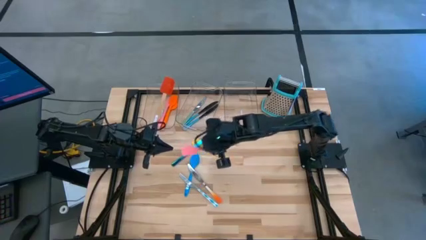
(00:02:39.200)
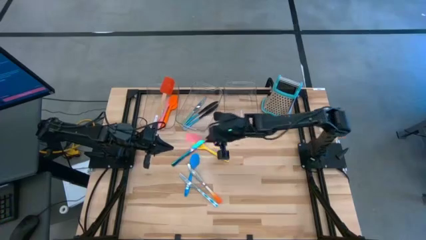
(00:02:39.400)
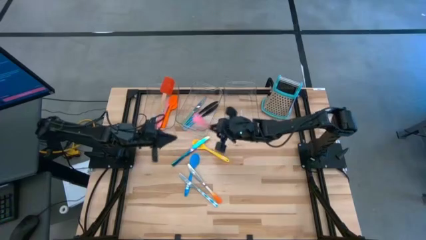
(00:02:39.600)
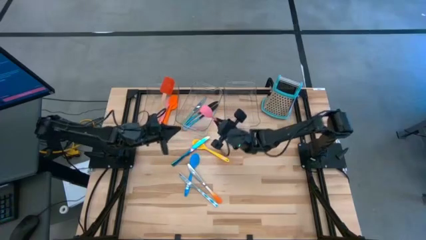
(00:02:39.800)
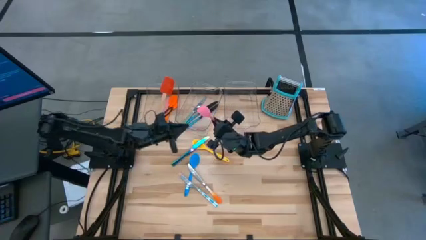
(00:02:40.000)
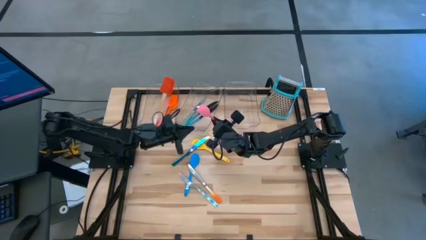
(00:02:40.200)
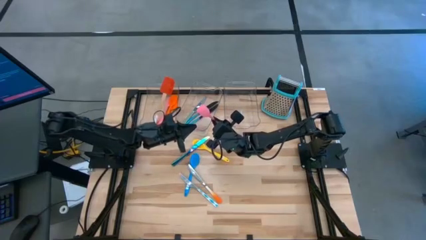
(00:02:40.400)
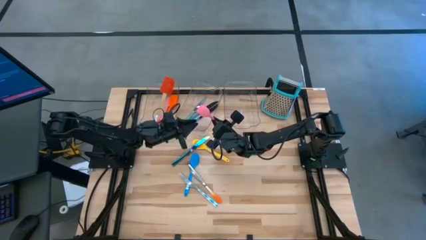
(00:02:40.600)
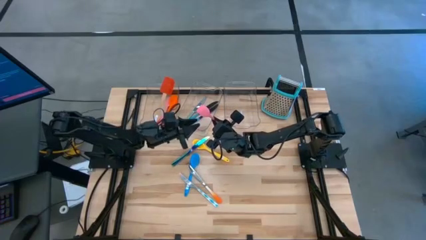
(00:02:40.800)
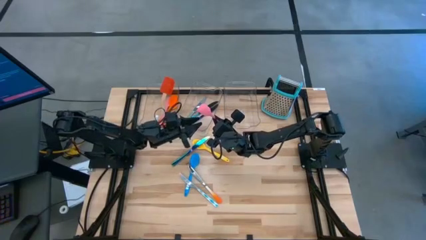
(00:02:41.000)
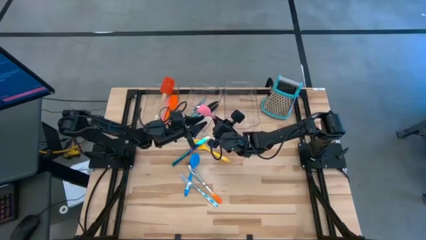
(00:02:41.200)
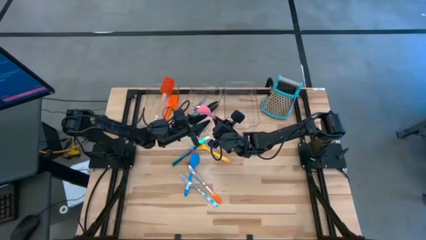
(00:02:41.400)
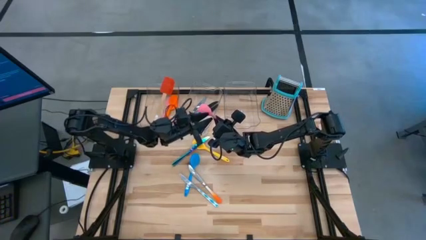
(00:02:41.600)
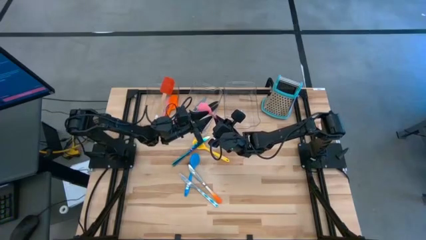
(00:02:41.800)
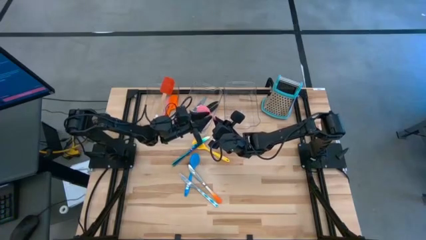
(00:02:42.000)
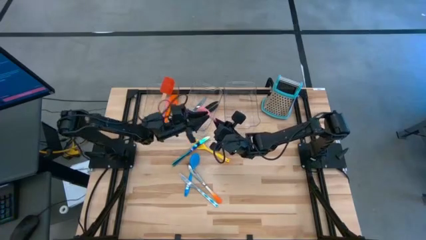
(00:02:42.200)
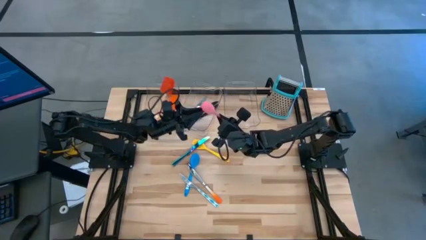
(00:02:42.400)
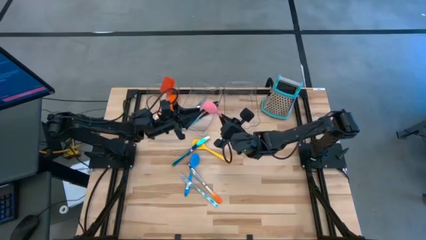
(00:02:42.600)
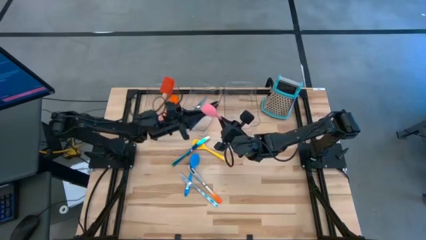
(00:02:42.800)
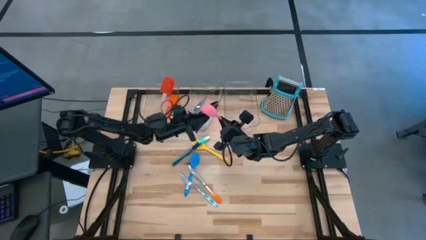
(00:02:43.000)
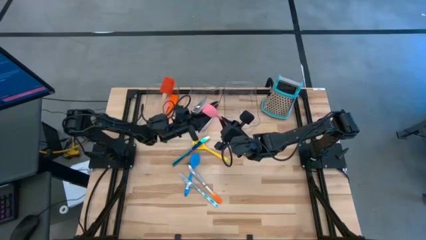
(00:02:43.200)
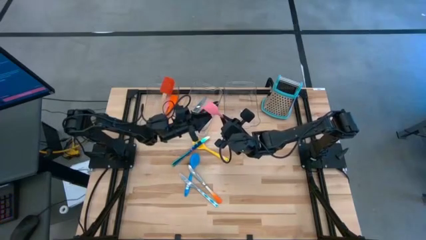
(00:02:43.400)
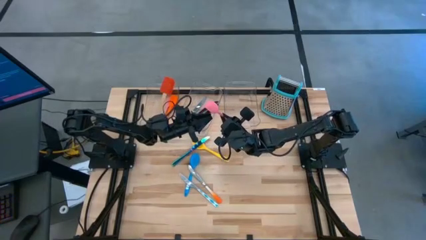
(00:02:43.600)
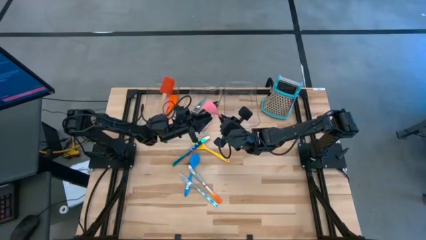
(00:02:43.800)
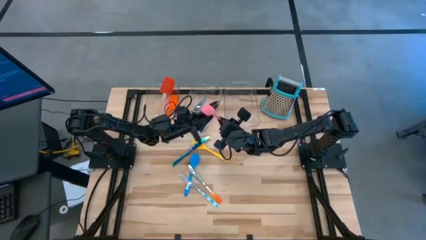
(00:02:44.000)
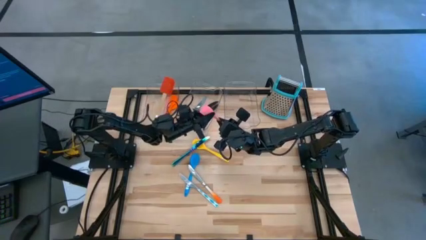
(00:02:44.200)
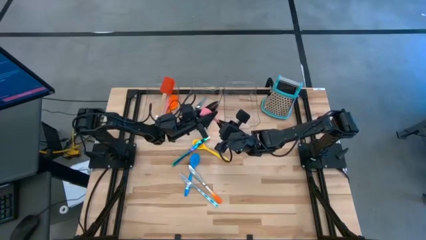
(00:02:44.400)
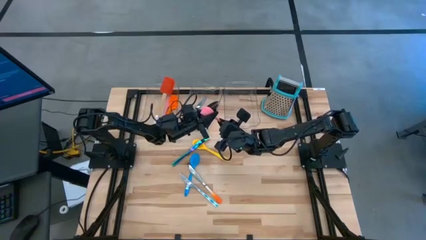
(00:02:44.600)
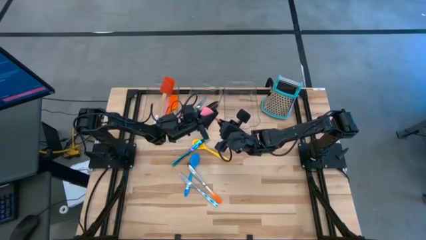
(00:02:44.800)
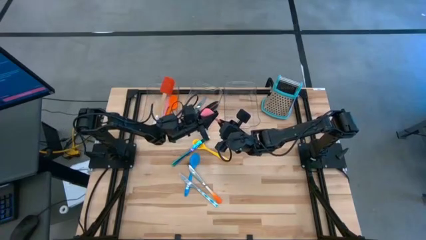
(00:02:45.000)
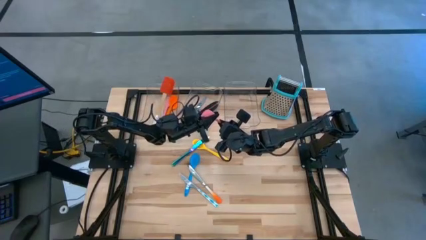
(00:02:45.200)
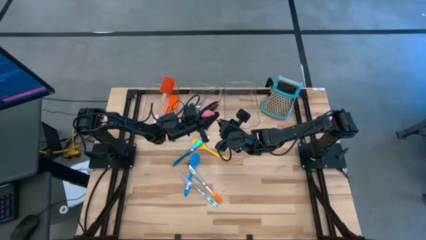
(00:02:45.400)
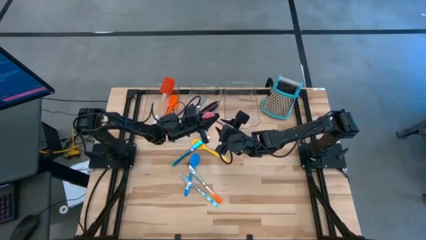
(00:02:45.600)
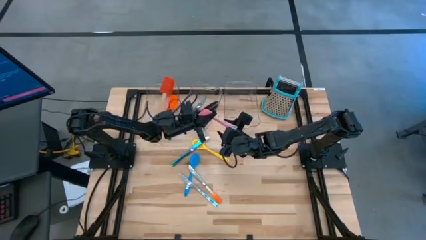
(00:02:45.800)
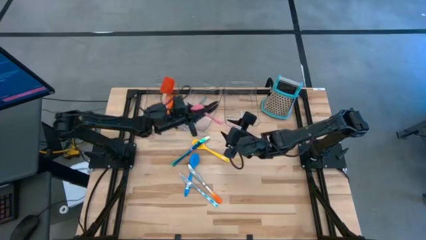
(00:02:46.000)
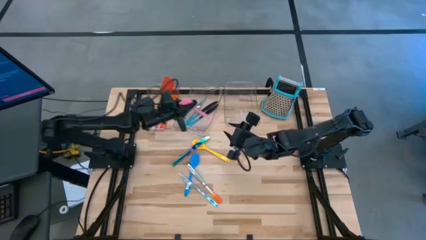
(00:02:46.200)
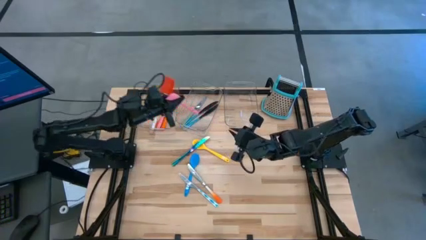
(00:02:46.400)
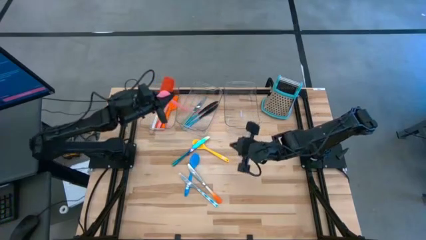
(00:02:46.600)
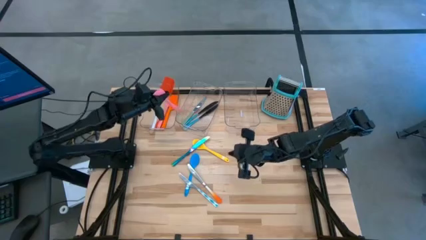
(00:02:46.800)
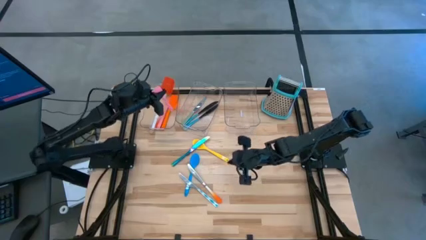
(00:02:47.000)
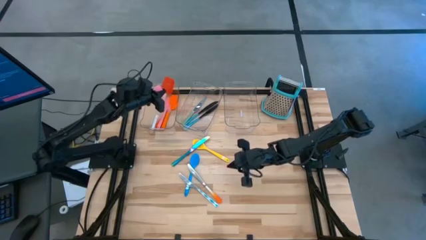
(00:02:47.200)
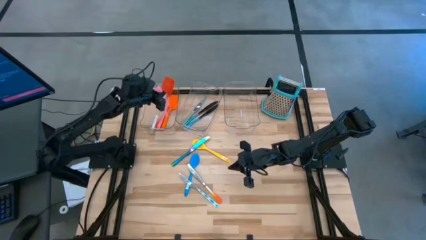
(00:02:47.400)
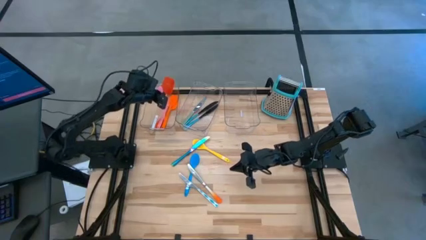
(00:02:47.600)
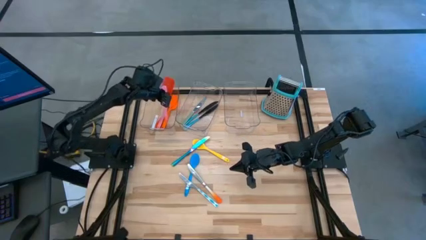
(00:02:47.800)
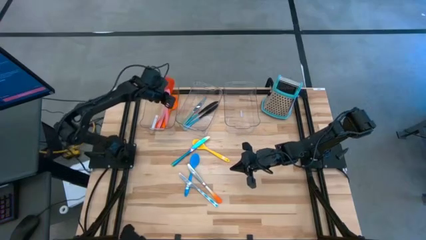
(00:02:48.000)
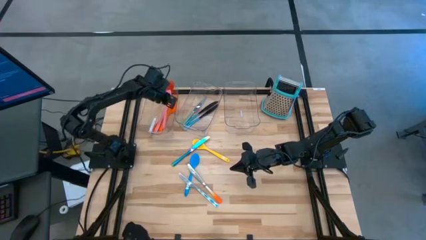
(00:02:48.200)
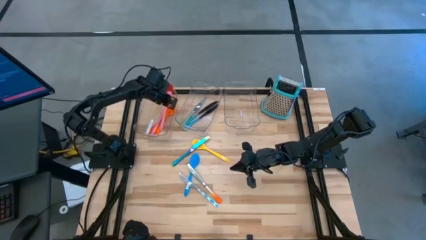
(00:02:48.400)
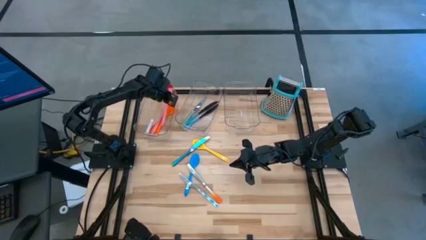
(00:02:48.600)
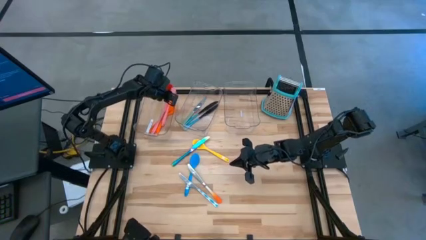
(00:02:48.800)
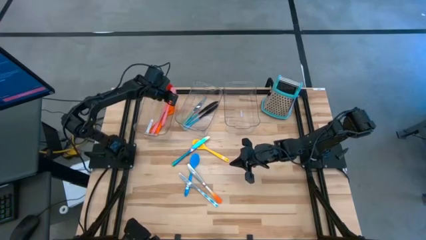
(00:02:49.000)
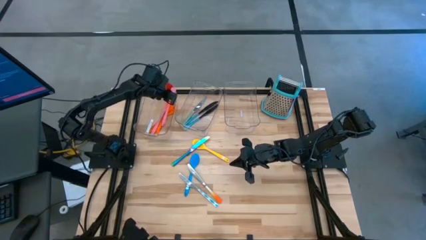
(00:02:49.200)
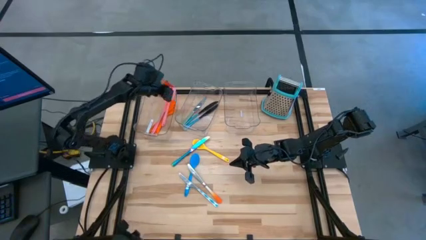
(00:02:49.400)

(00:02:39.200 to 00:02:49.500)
Task: Pick & Place Kitchen Items
Put the pink spatula into the left transparent bin

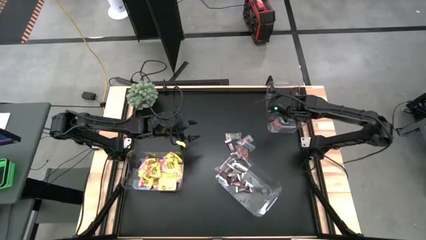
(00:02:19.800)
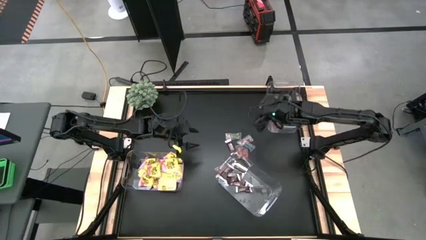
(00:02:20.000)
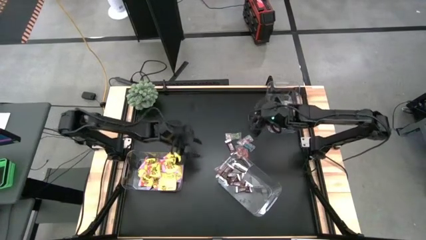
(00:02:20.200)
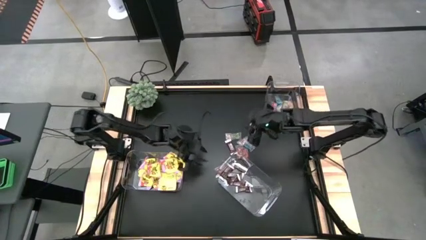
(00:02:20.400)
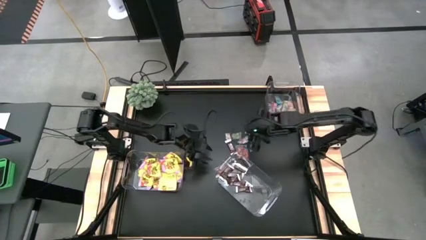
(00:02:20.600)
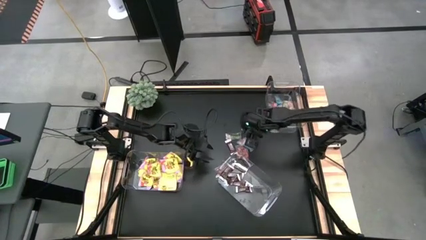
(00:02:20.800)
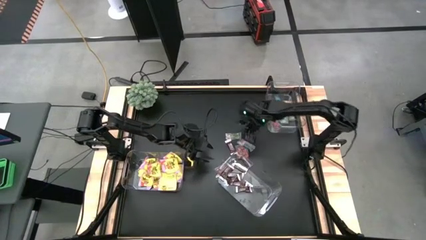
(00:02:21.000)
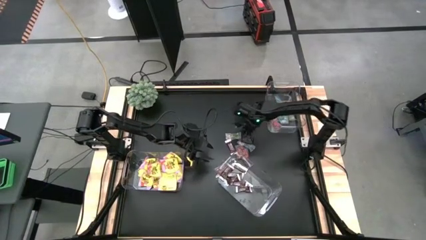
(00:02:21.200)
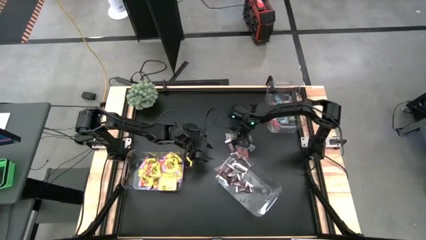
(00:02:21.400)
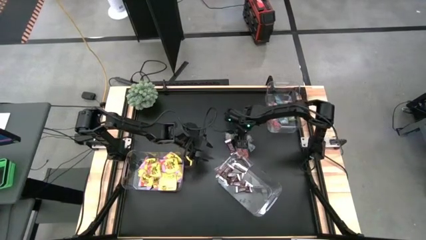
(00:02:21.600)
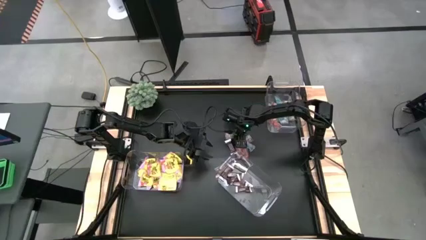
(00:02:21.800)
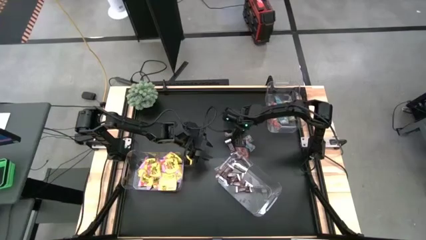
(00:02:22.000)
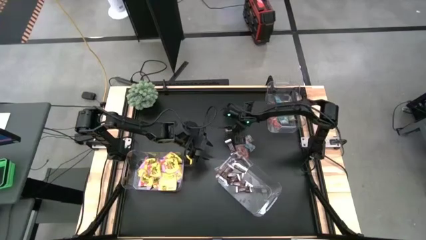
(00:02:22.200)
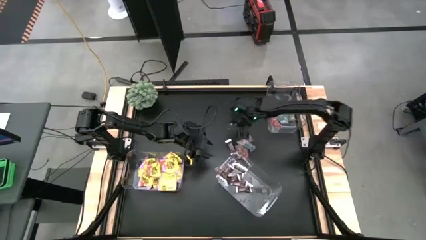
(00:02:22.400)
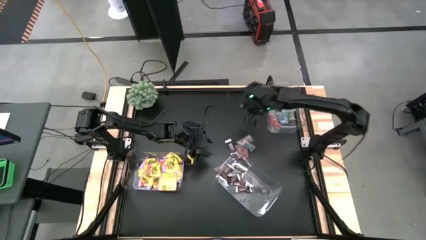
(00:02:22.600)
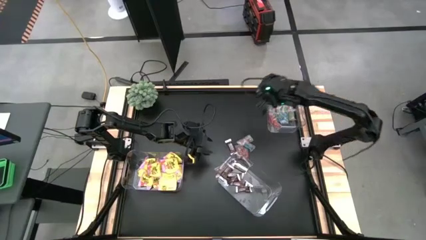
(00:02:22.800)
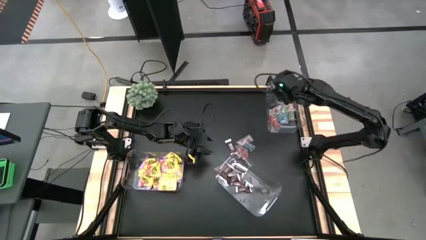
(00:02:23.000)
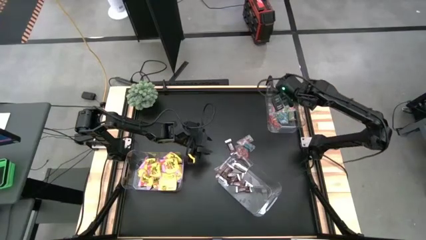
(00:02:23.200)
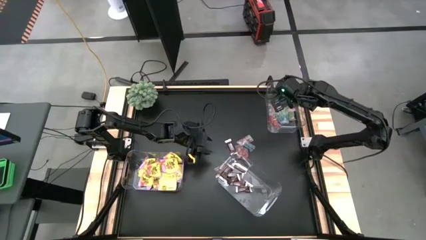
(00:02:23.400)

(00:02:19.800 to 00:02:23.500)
Task: Sort candy
Put the green candy in the top right transparent container

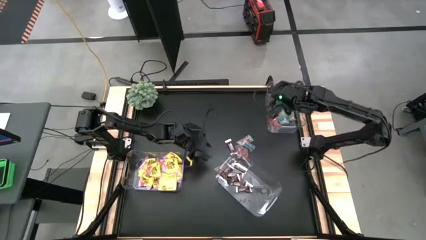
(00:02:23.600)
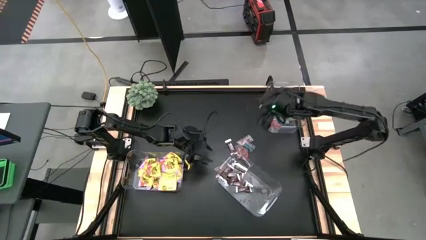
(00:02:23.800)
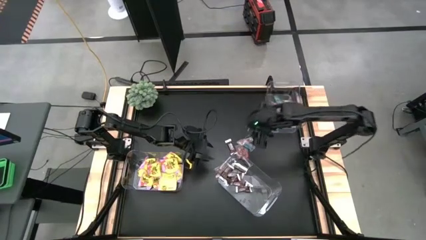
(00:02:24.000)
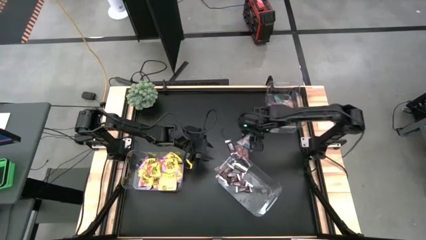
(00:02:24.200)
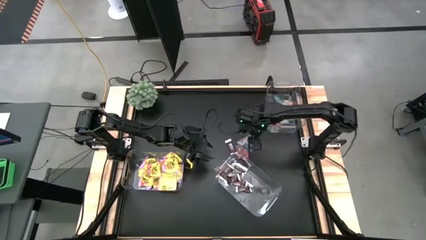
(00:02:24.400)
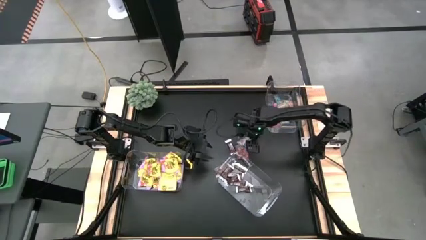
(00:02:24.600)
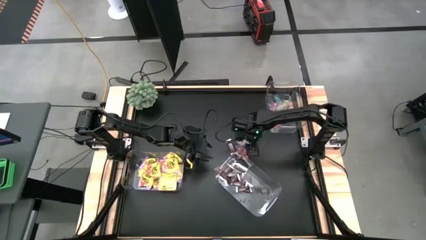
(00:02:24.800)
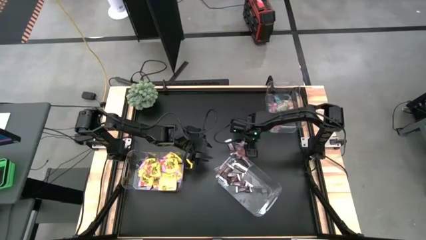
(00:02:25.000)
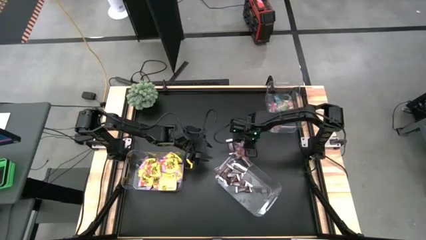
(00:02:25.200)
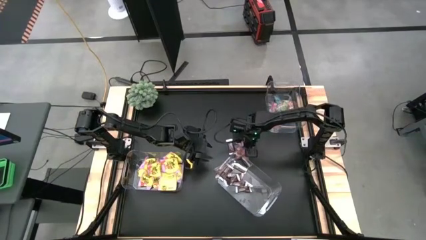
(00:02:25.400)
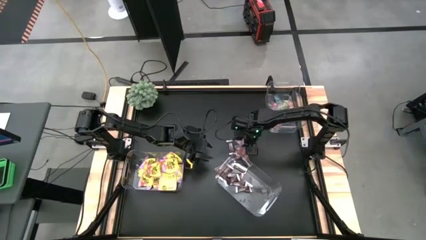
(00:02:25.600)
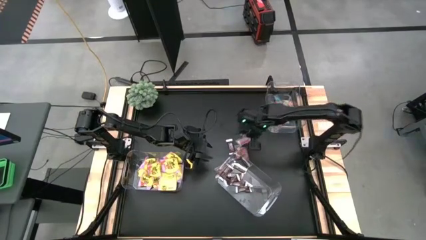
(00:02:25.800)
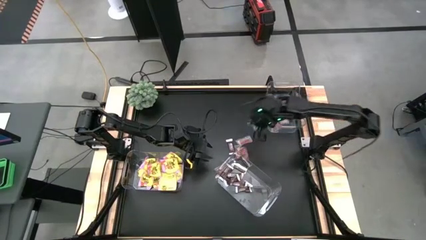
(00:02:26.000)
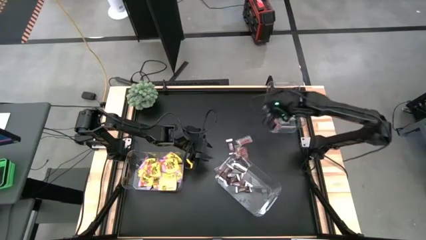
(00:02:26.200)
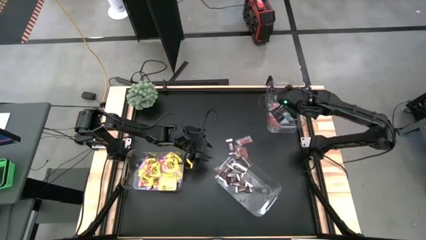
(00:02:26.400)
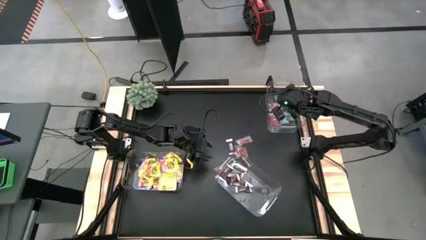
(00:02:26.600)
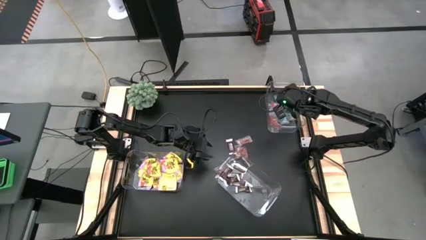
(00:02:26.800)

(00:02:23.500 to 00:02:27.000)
Put the blue candy in the top right transparent container
